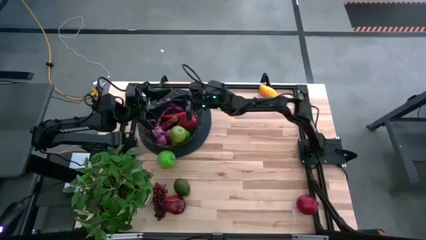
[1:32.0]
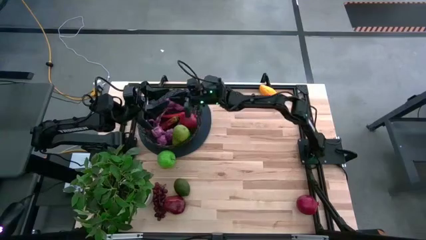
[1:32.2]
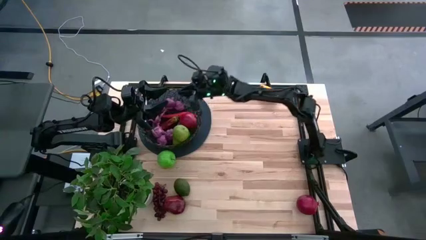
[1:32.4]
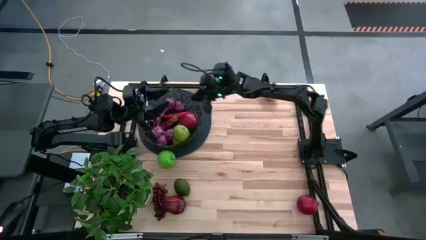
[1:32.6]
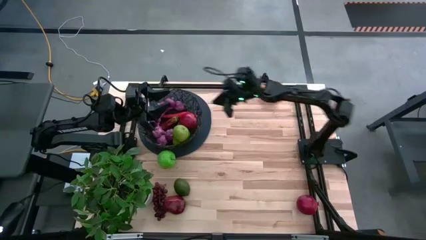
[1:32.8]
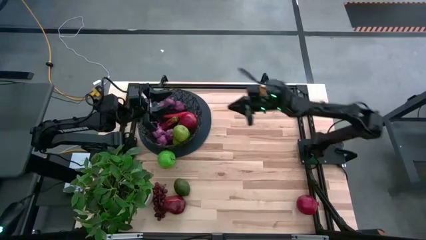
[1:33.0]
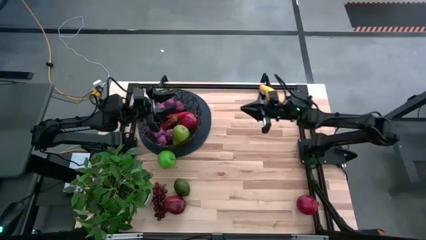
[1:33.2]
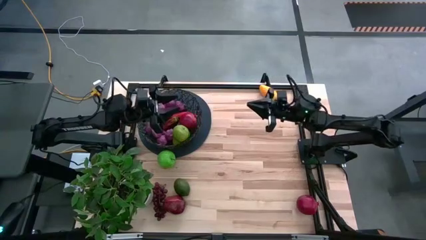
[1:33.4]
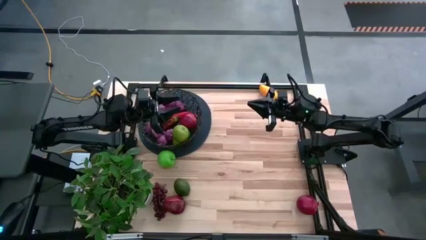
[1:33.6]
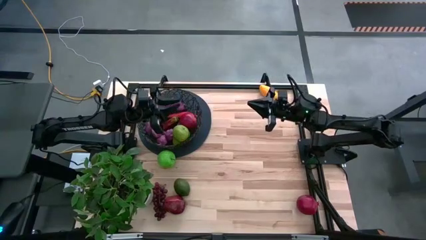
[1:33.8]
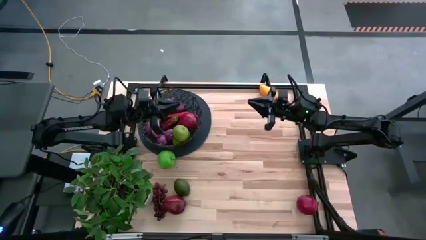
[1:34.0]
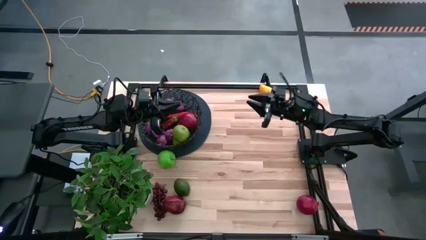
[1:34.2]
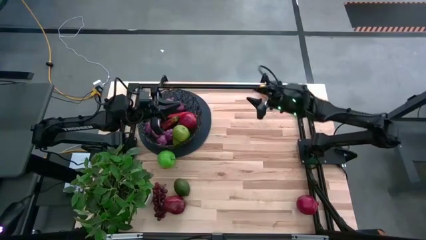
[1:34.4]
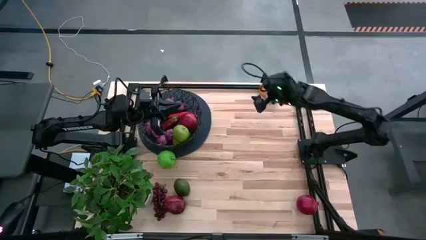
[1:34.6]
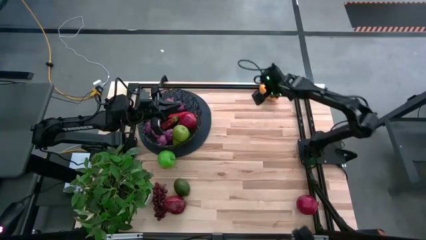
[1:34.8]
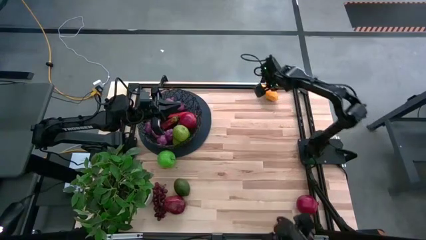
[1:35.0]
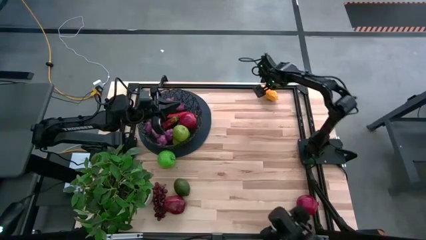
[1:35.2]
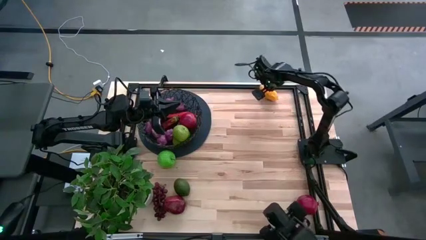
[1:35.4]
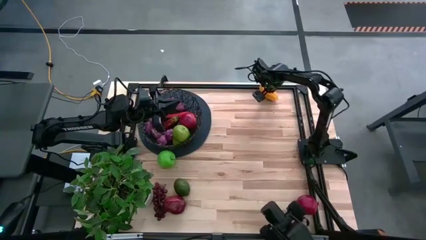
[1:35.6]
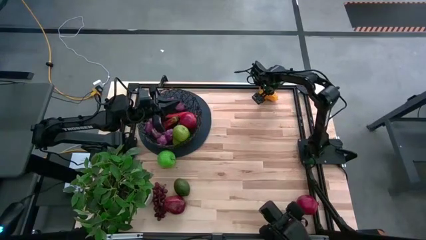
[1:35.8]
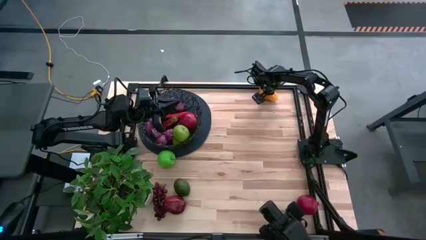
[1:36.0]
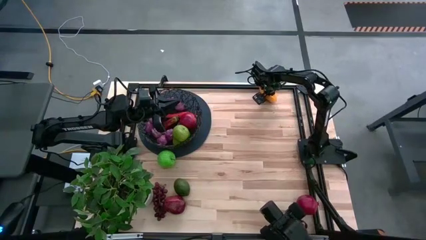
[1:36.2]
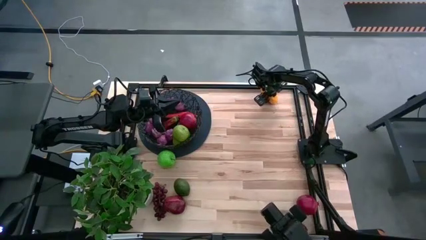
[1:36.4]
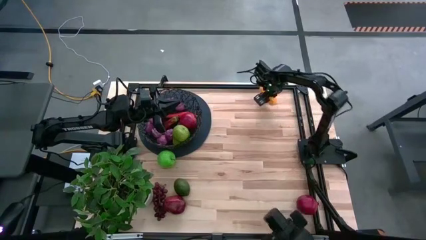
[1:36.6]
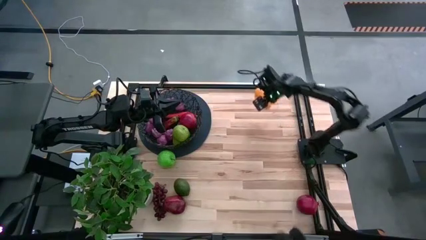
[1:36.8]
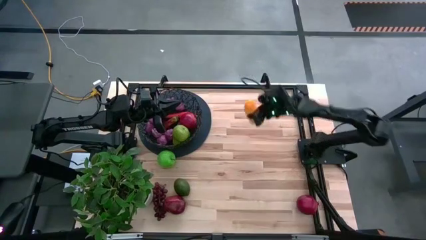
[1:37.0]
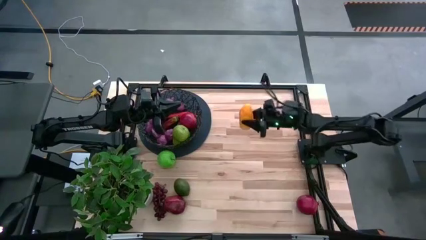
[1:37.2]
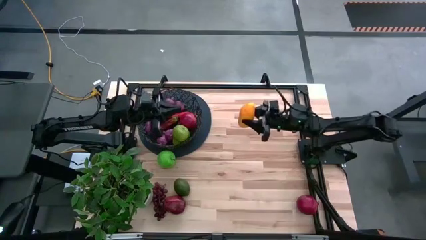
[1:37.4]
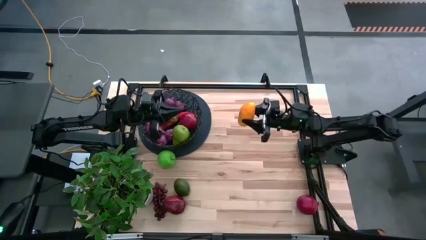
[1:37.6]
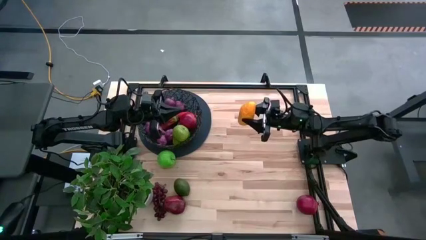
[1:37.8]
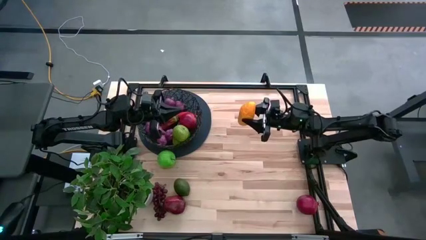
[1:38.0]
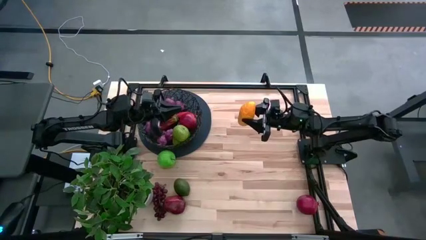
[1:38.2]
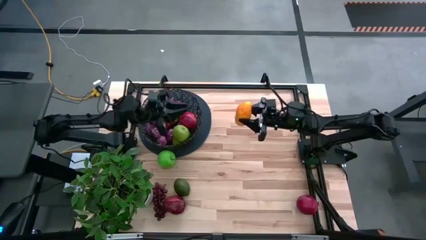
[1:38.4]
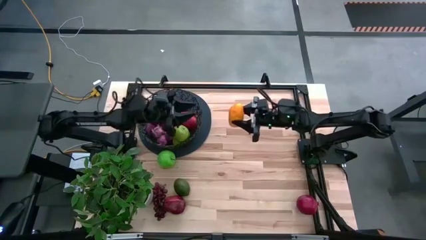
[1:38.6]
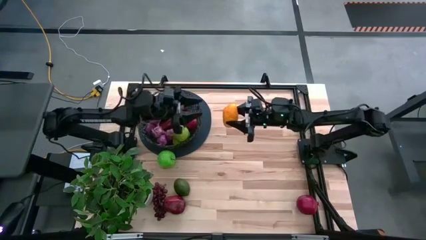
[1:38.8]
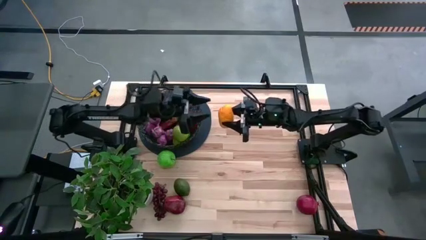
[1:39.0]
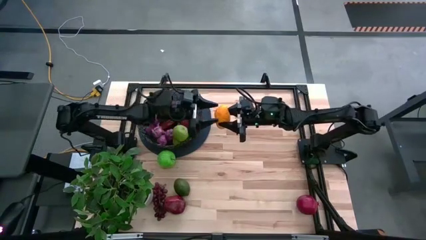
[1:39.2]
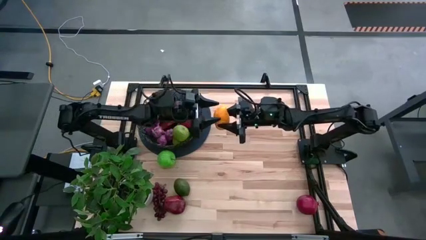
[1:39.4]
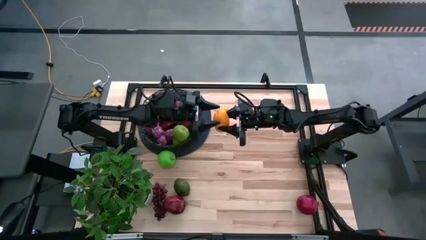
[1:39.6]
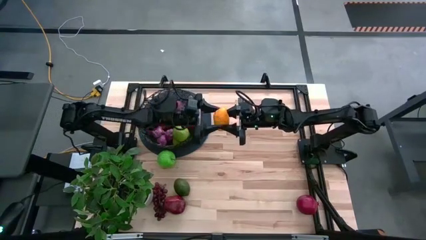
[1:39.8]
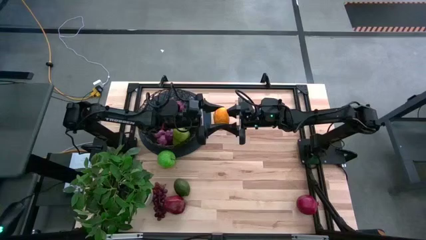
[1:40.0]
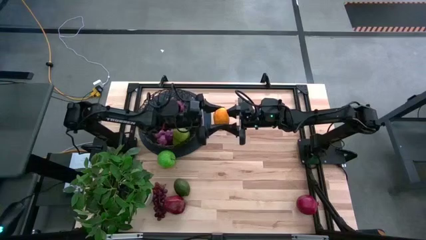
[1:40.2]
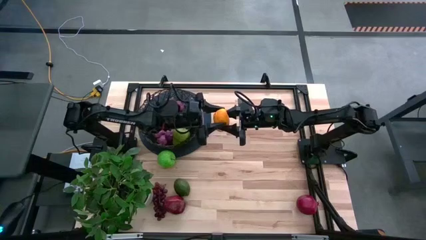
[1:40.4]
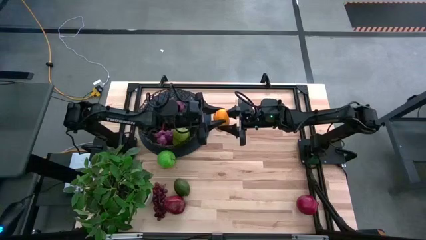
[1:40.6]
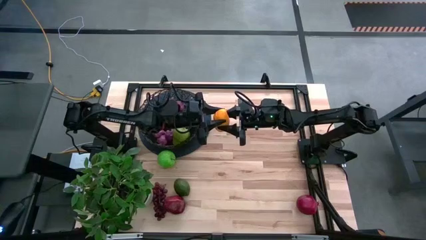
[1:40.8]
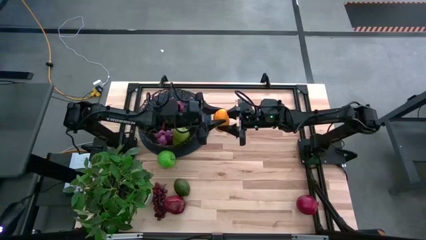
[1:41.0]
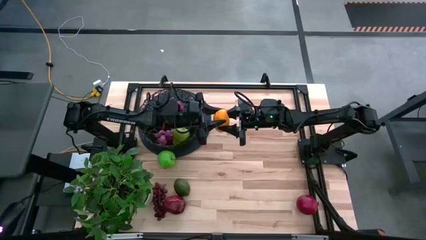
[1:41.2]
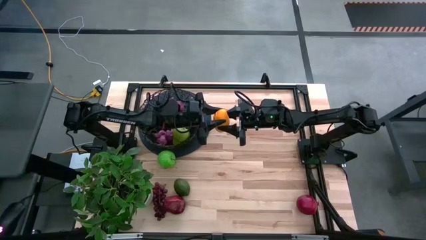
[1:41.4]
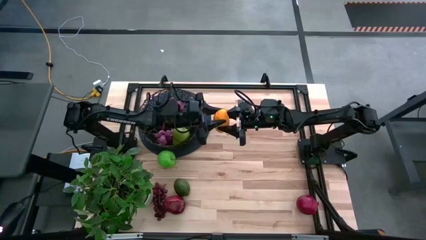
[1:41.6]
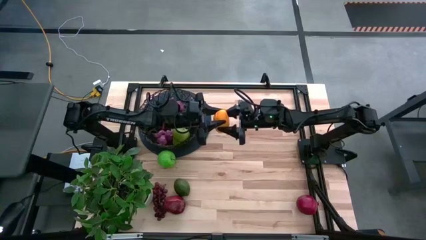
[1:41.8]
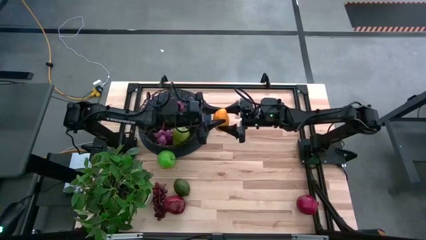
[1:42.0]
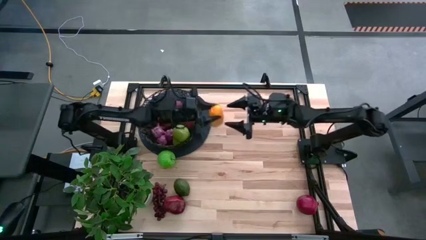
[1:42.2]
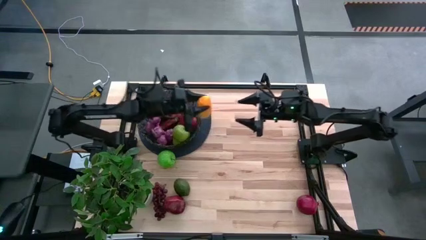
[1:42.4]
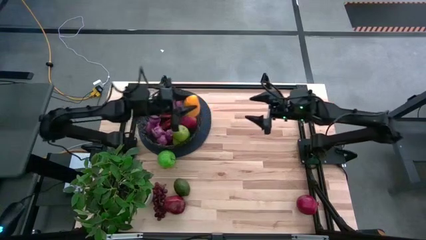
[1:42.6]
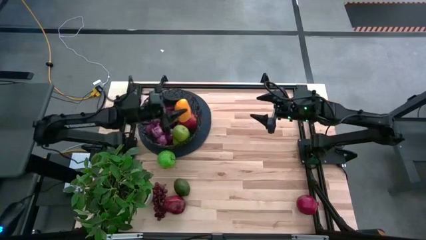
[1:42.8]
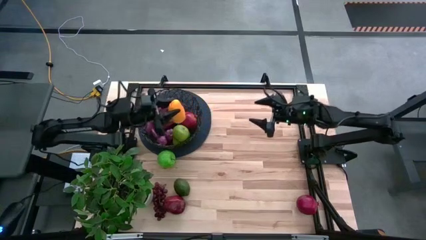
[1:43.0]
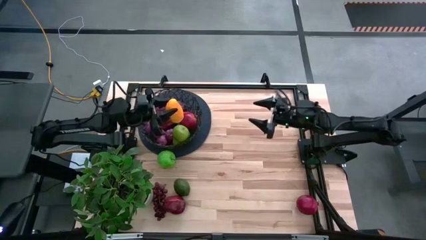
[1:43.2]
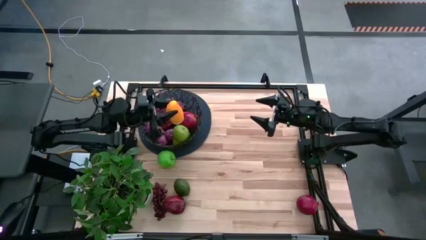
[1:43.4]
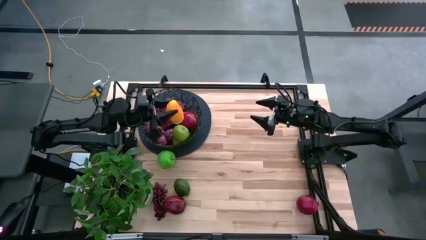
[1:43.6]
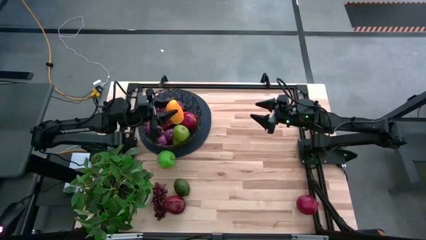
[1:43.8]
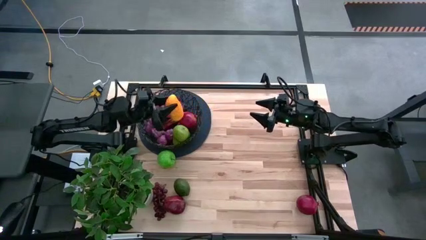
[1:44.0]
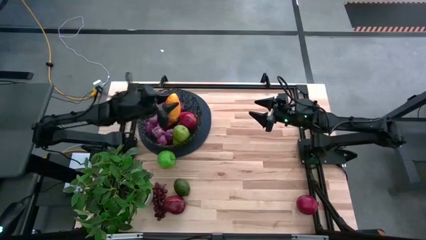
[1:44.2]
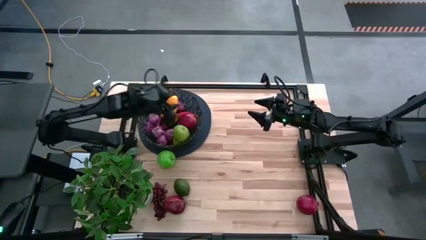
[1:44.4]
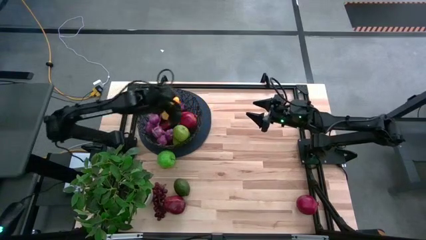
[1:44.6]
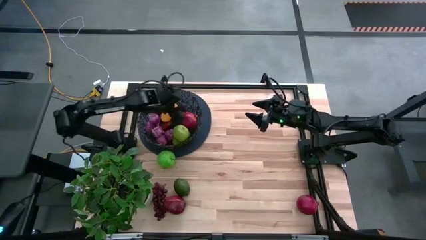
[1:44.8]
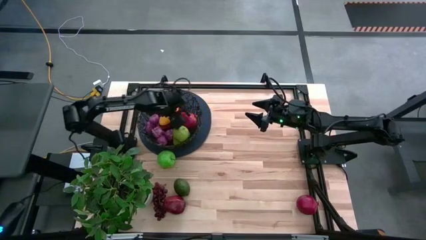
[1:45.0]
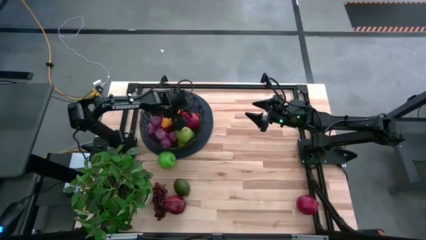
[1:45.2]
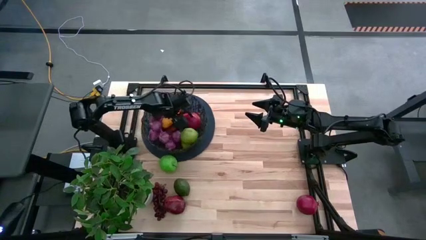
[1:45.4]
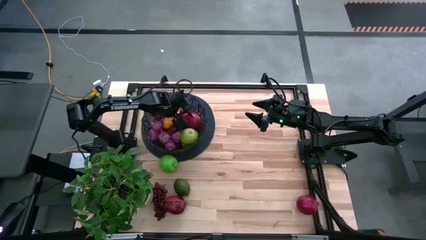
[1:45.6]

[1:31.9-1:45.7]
Task: Build produce basket
Put the mango into the wire basket

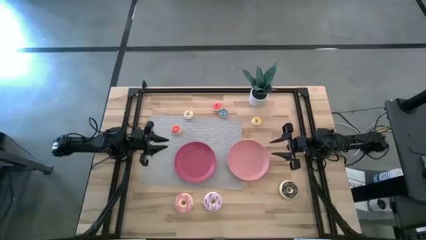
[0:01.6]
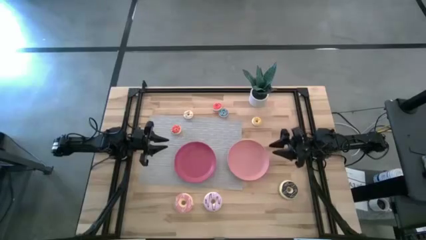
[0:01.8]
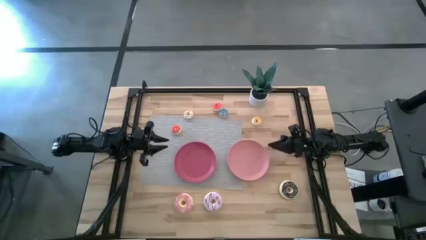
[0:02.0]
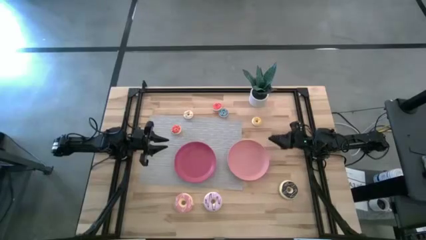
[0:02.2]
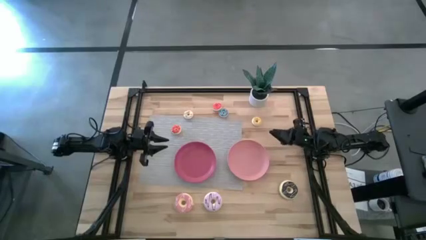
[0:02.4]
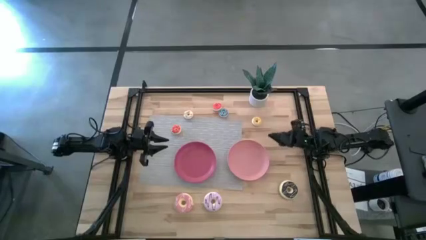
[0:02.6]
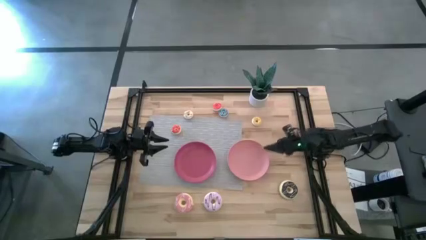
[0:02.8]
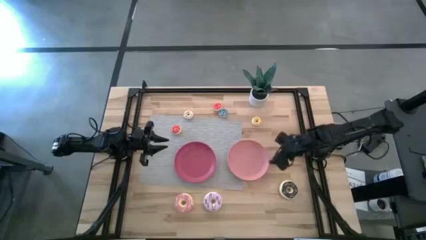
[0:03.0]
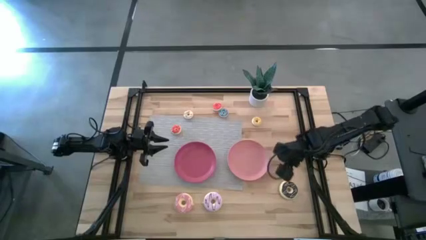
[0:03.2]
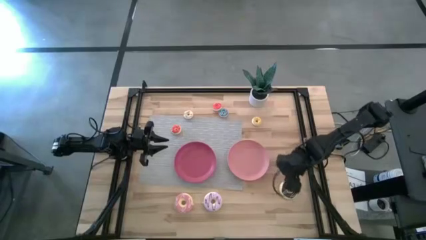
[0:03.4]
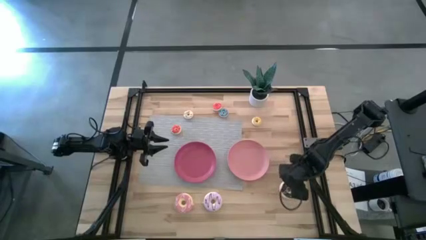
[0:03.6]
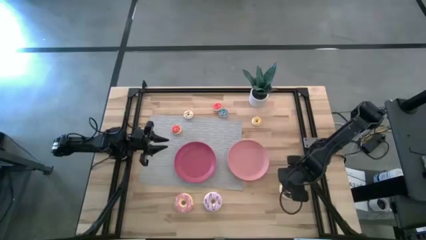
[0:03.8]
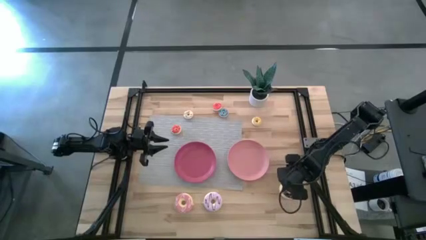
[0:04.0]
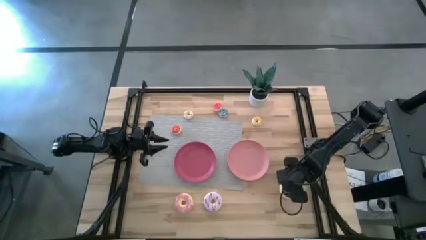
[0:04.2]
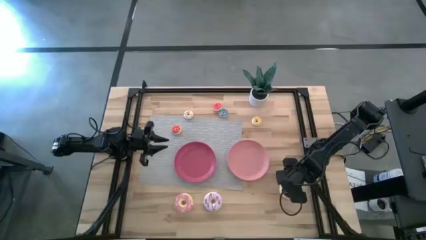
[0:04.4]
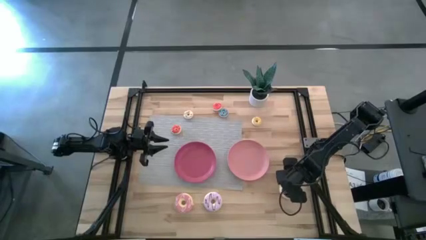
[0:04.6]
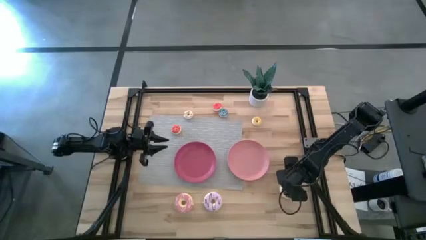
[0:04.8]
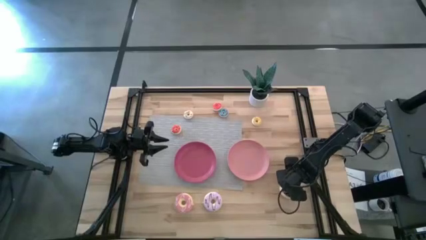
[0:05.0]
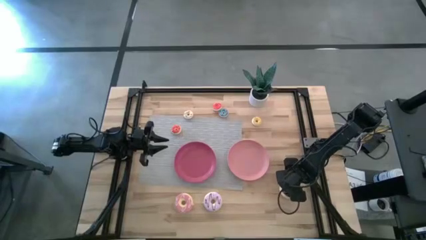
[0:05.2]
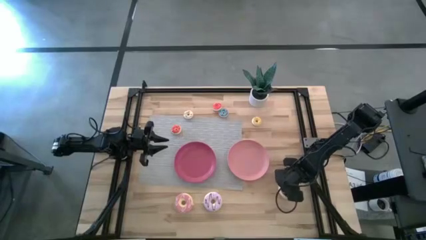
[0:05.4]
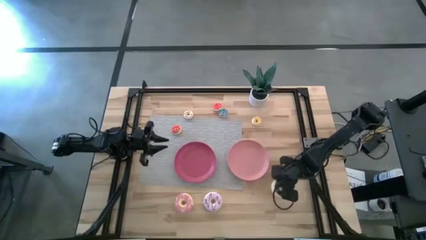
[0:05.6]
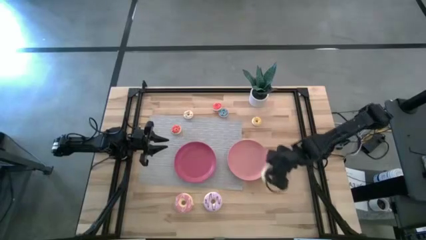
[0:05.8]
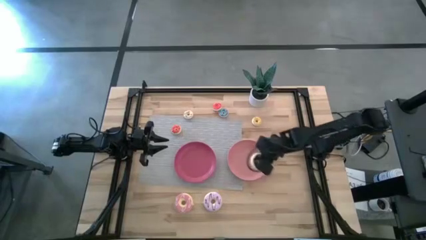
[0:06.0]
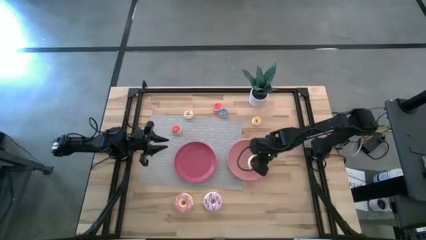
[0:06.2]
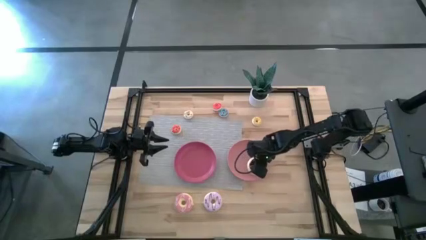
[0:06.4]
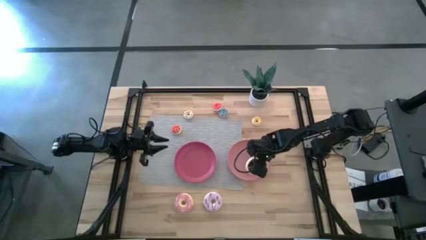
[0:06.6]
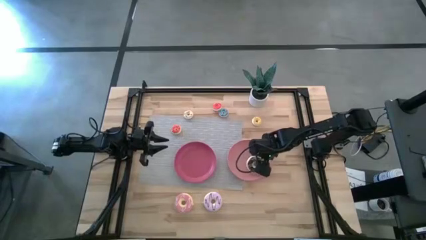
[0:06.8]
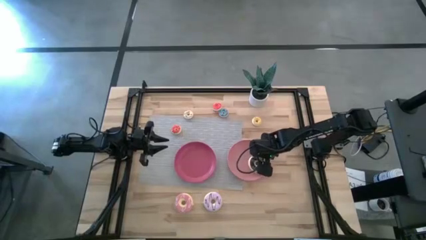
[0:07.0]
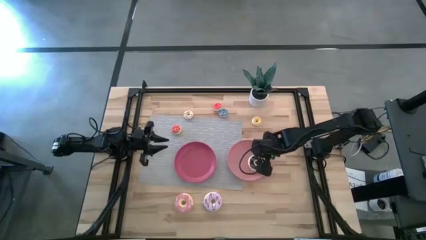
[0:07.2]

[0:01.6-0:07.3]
Task: Pick & Place donuts
Put the large black donut on the light pink plate
